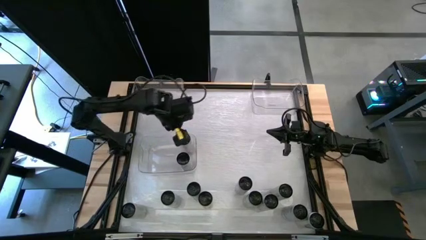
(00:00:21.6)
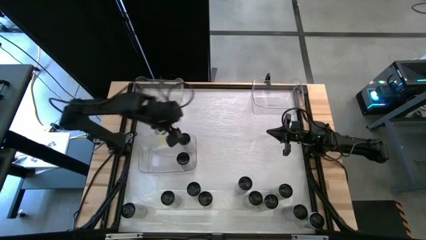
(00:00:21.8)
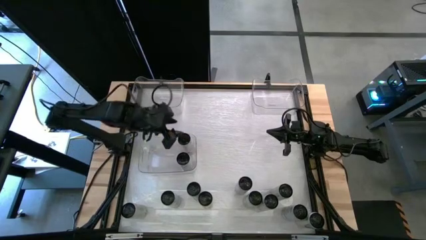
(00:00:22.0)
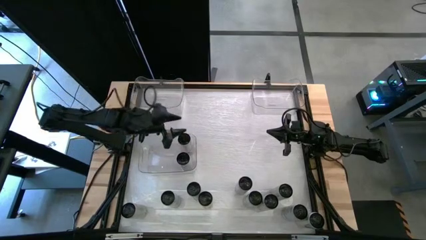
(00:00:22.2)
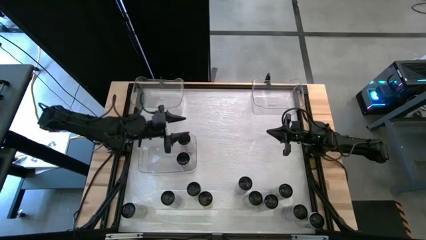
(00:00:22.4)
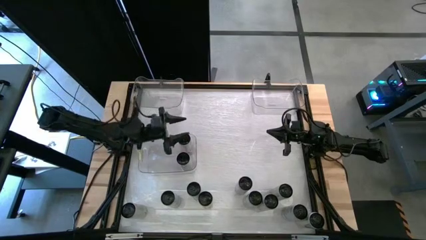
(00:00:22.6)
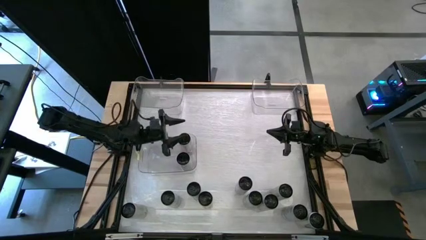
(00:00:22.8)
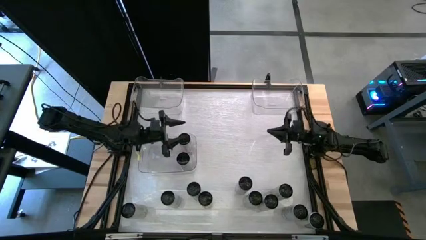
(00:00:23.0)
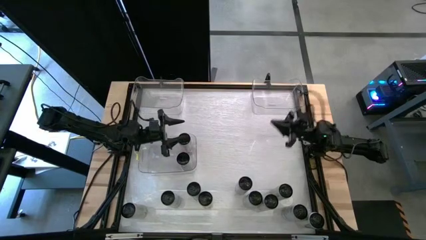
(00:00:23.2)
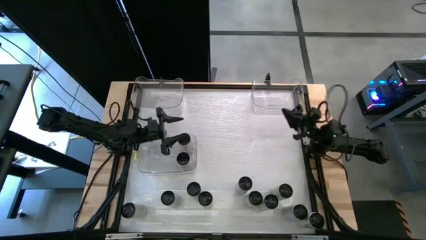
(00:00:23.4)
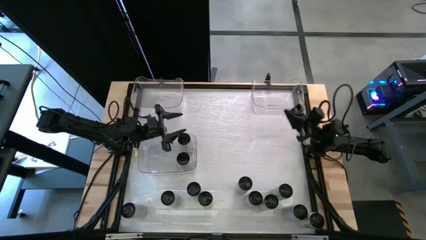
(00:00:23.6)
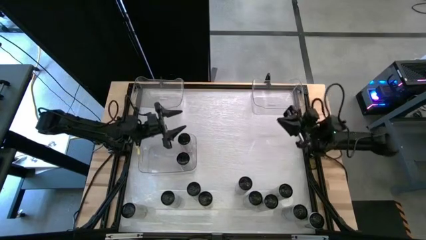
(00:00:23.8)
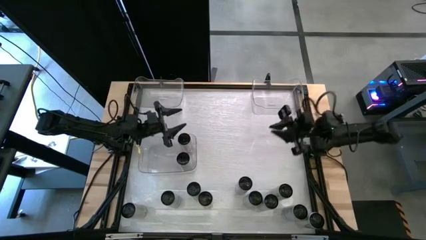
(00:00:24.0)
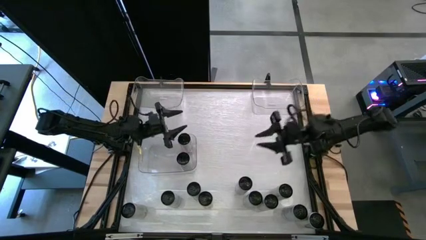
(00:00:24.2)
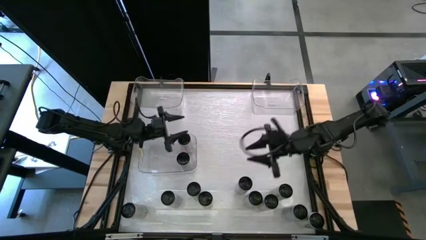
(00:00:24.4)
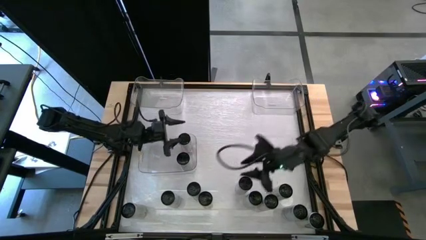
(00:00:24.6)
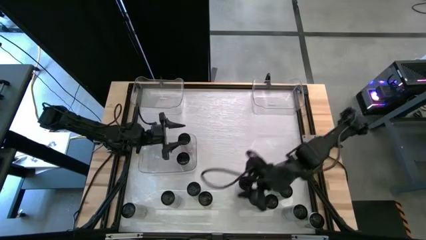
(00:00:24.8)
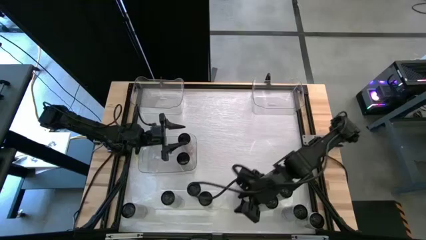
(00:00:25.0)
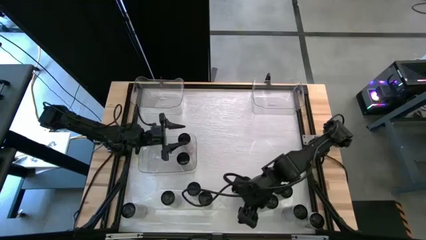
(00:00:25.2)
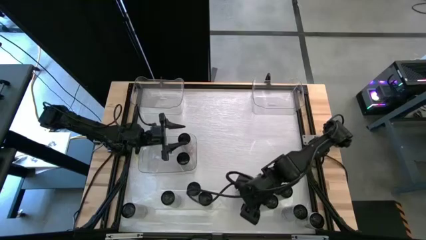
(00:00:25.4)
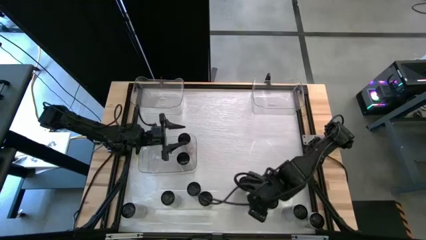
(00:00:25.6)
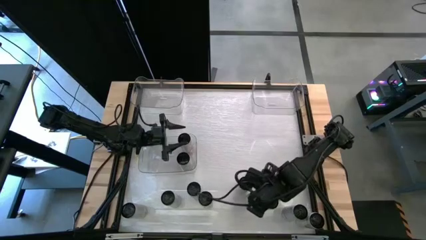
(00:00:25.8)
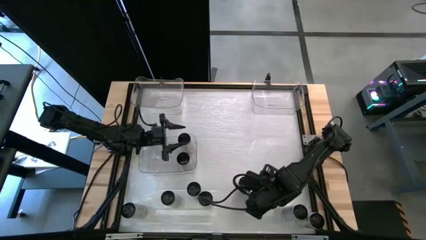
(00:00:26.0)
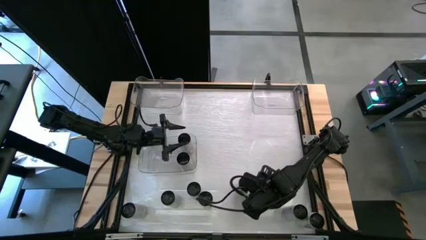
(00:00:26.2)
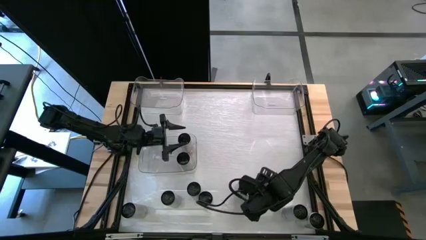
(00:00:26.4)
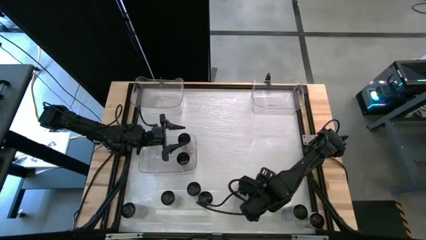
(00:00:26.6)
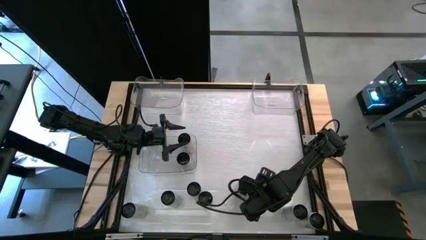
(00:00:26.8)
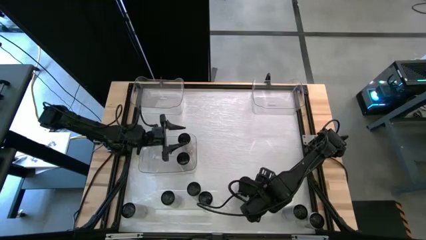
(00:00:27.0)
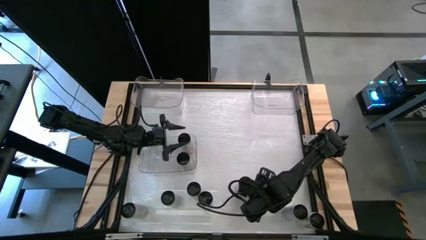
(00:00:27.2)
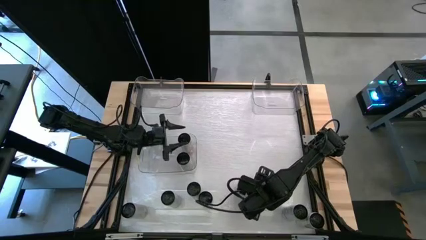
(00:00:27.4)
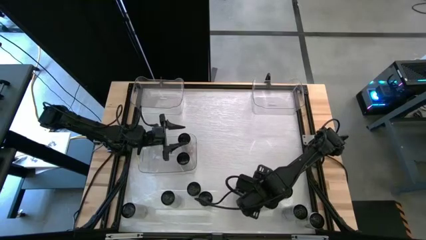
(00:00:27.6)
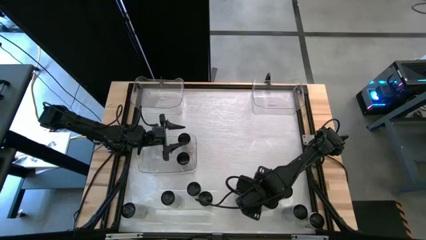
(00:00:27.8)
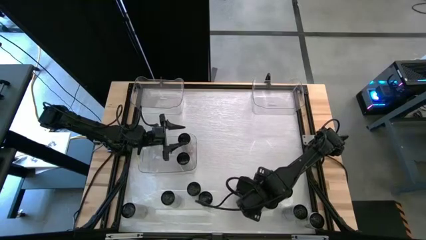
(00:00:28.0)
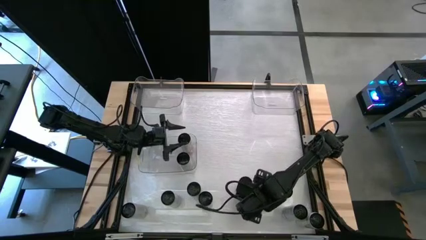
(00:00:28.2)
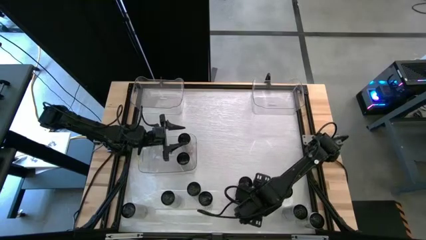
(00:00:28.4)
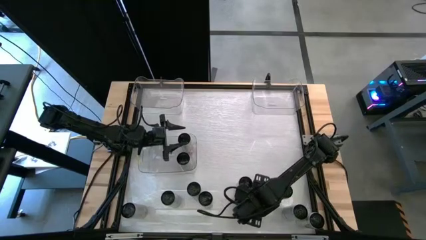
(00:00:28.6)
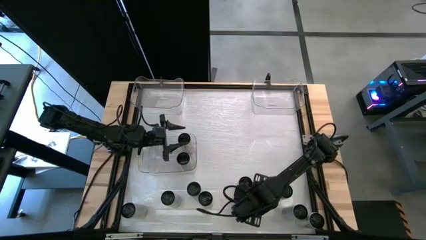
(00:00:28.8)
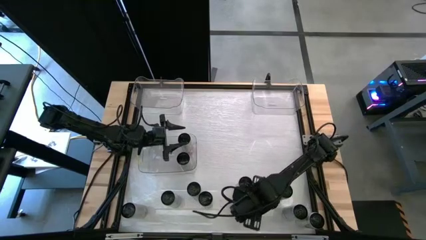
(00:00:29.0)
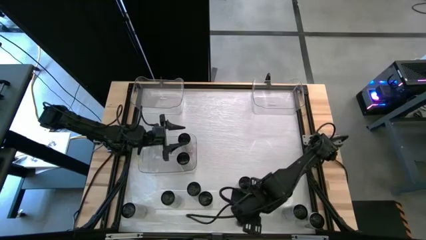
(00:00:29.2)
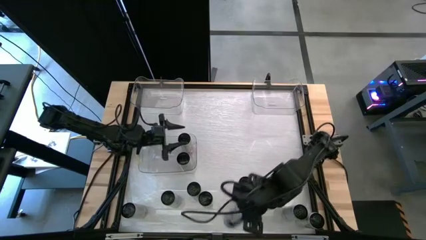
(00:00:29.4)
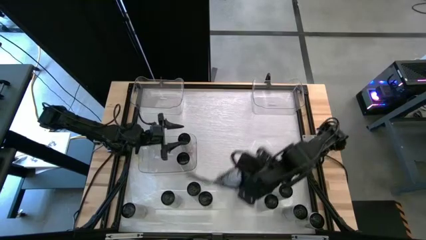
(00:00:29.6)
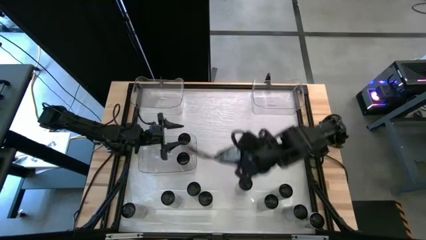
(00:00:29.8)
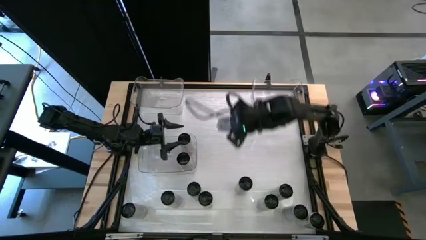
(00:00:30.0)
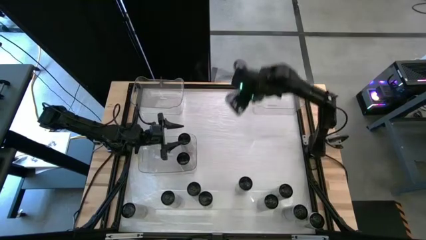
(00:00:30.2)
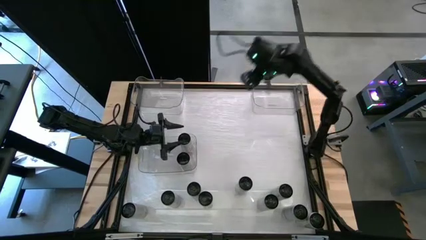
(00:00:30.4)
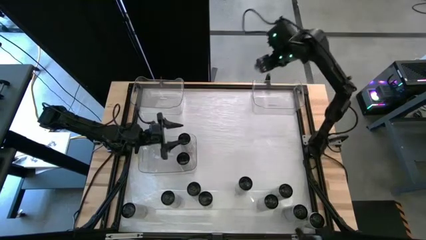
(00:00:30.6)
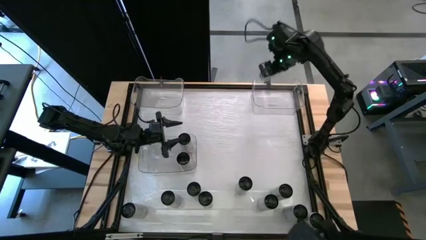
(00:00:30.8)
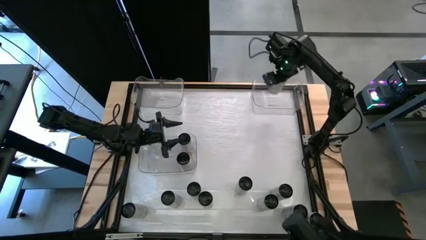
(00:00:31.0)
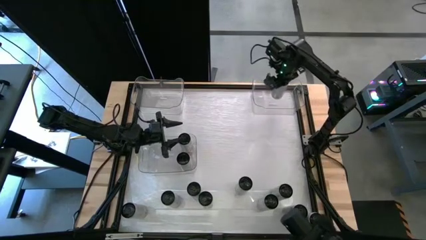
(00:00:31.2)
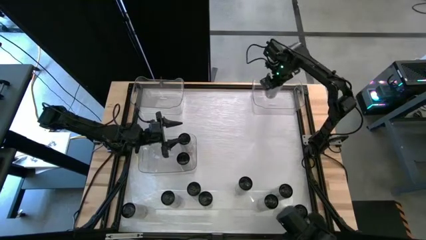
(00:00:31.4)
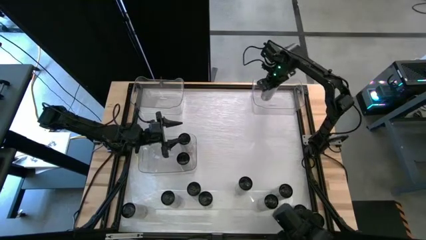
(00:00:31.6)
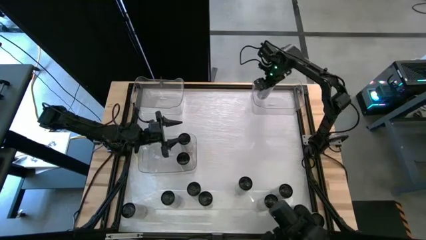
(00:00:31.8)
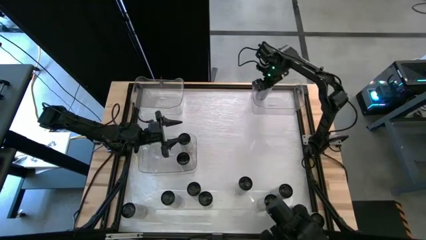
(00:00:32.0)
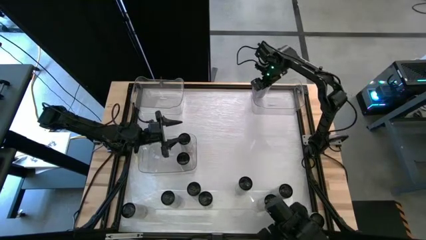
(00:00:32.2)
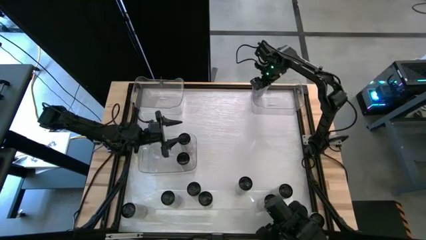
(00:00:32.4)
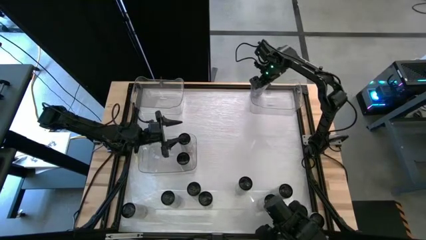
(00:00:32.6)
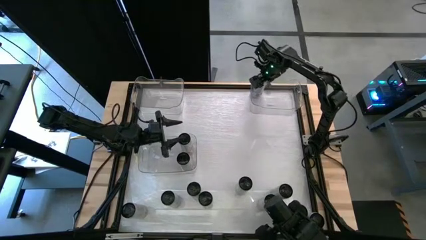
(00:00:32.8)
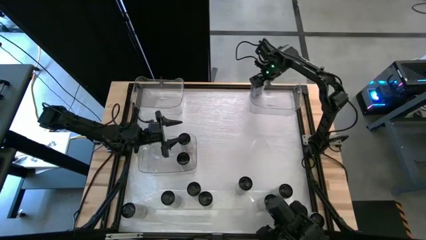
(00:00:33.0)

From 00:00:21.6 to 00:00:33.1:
Task: Sort soda cans
Put the white-blue can into the top right transparent bin

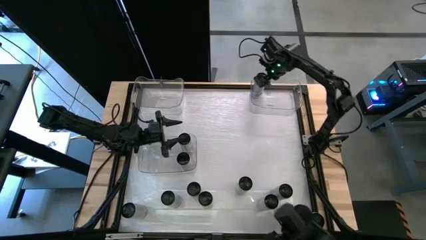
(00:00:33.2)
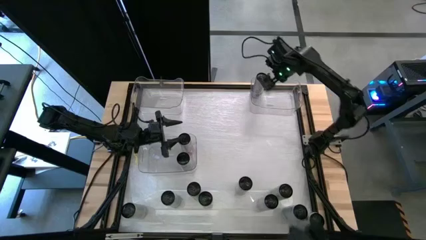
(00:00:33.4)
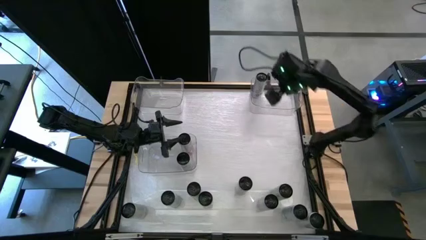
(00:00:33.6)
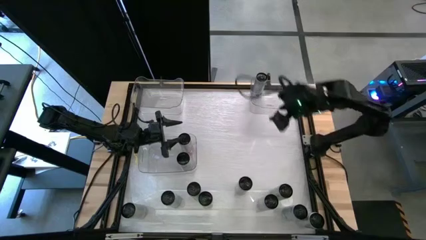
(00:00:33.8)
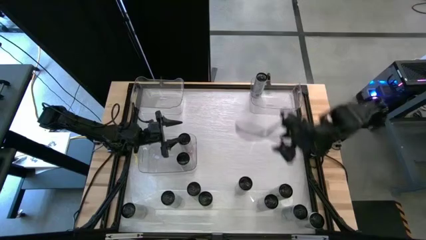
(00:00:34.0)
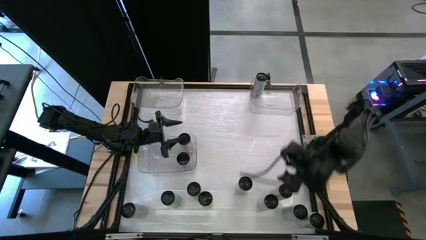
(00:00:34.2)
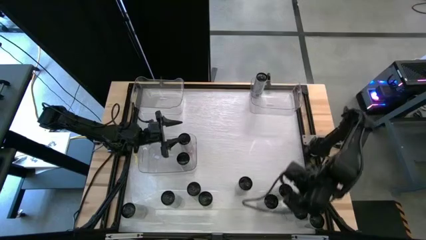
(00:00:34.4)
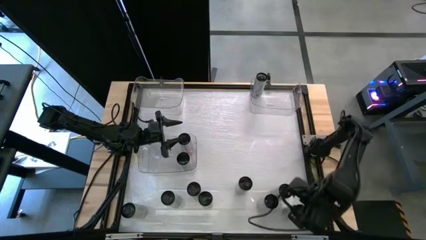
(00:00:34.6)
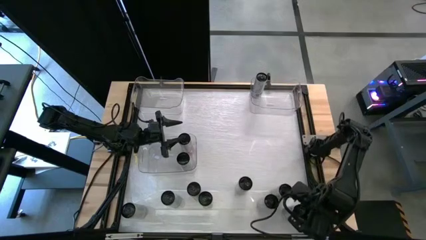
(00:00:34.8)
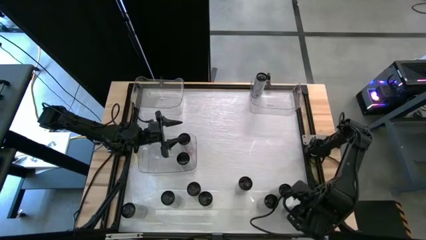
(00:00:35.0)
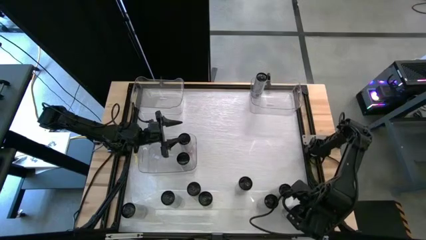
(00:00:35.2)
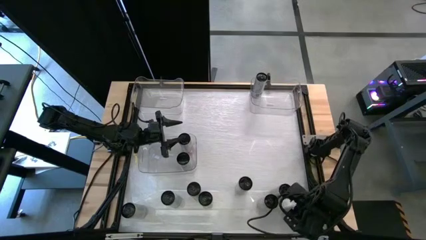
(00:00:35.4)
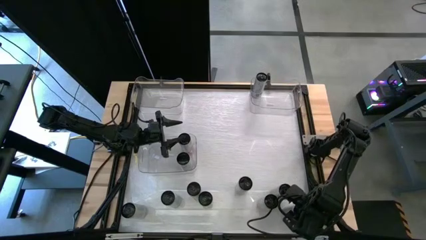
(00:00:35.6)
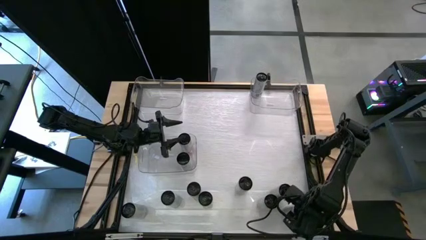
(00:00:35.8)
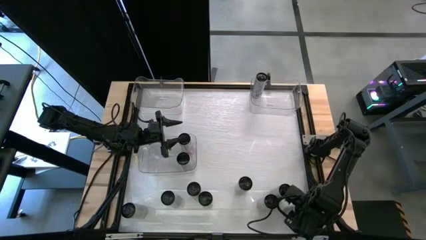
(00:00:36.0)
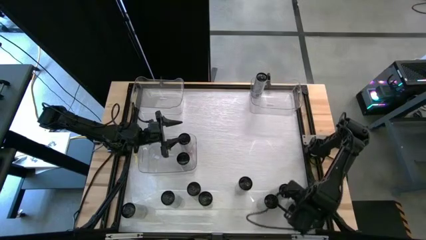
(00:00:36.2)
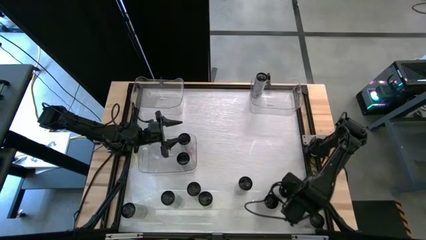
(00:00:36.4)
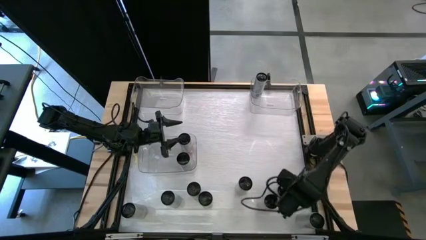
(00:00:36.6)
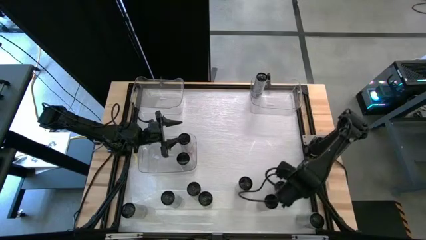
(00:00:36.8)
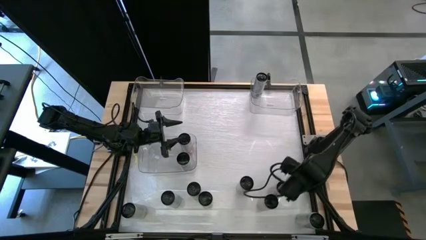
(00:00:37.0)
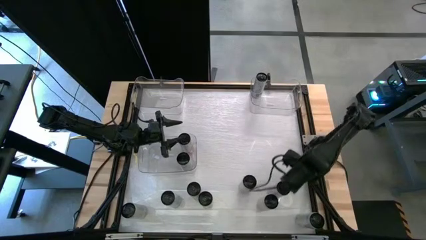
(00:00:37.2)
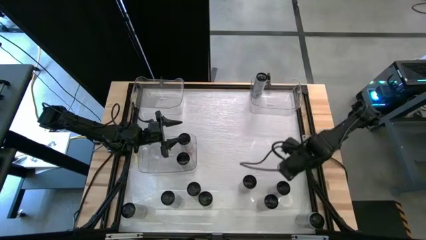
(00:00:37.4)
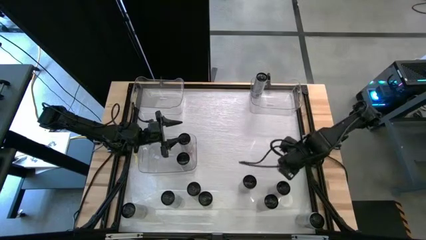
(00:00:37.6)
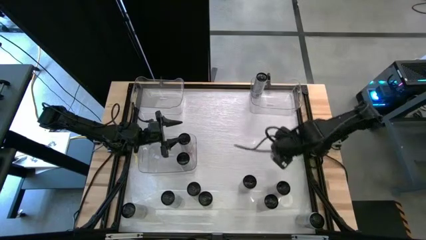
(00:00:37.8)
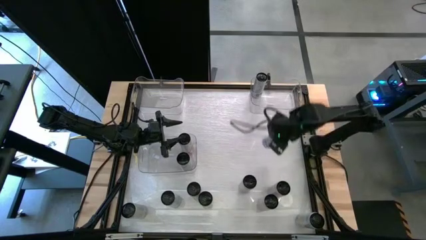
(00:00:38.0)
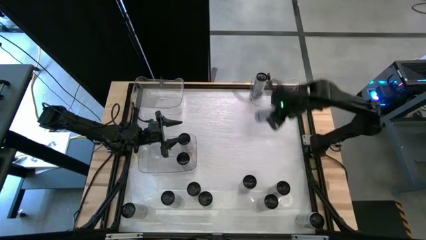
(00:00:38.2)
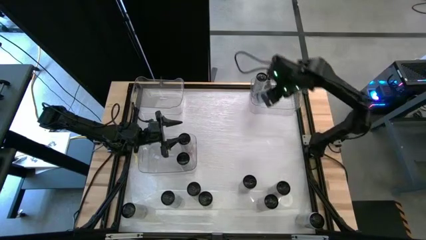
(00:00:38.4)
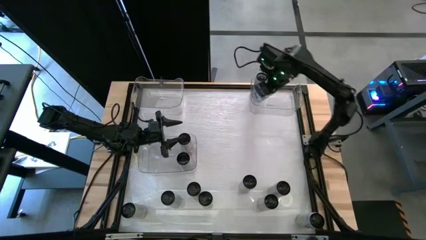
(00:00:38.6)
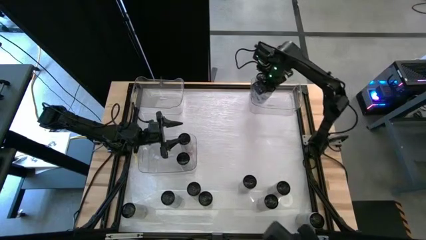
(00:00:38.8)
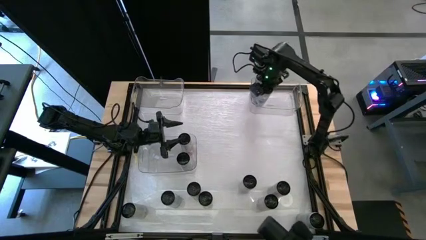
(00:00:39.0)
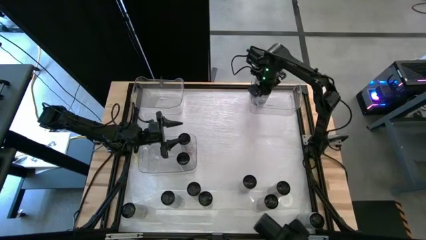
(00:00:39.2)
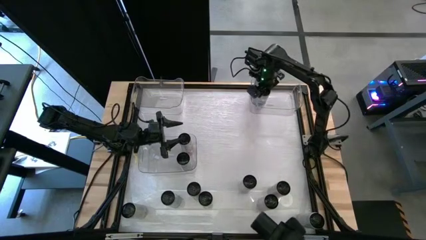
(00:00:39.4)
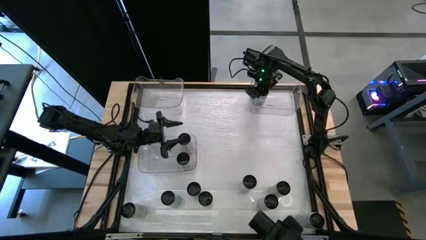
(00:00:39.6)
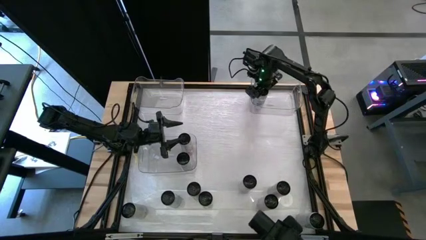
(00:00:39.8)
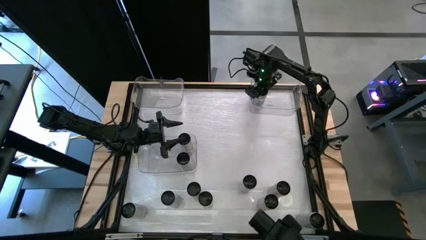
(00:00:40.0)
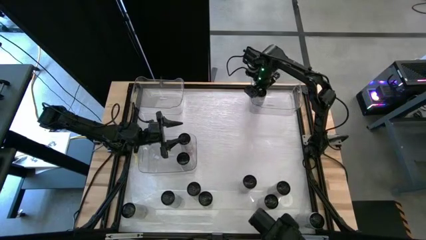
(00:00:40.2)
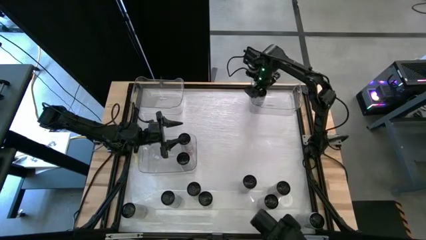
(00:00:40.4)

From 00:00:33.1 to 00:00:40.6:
Put the white-blue can into the top right transparent bin
